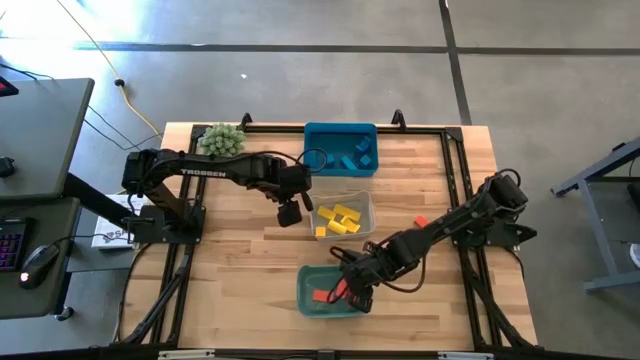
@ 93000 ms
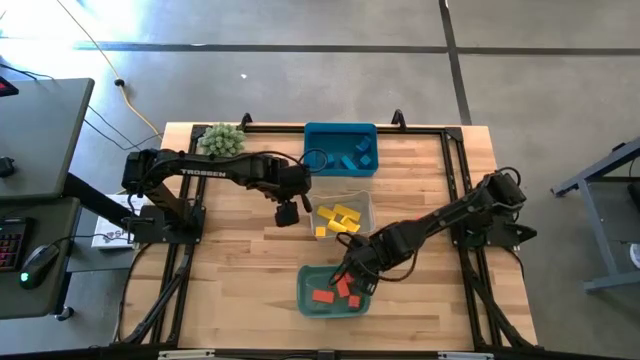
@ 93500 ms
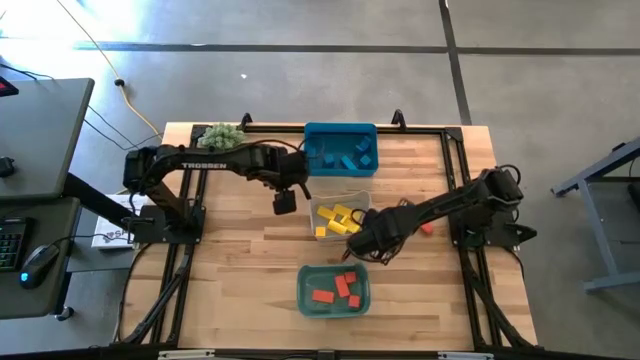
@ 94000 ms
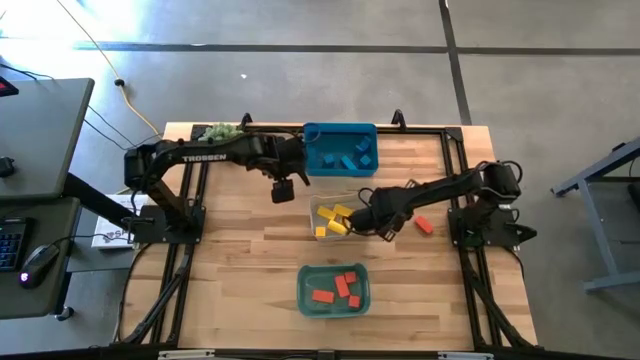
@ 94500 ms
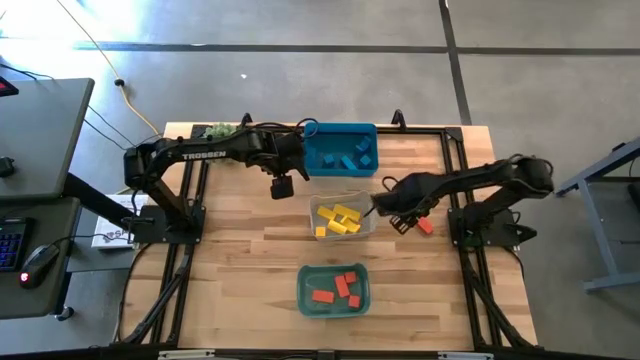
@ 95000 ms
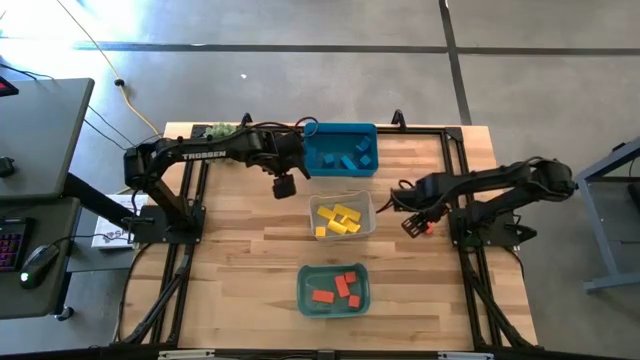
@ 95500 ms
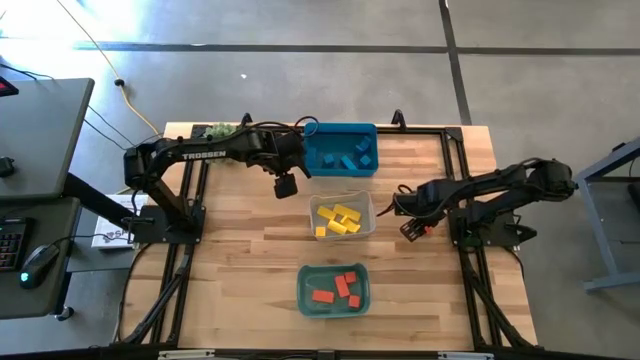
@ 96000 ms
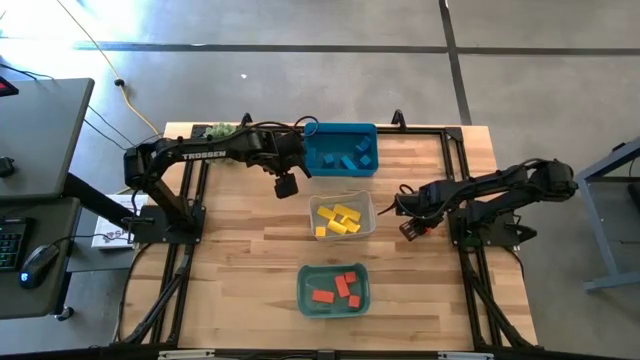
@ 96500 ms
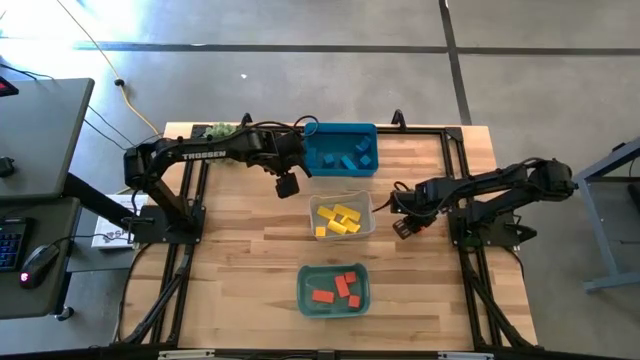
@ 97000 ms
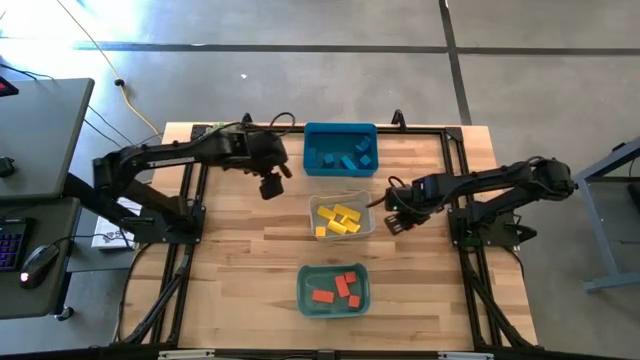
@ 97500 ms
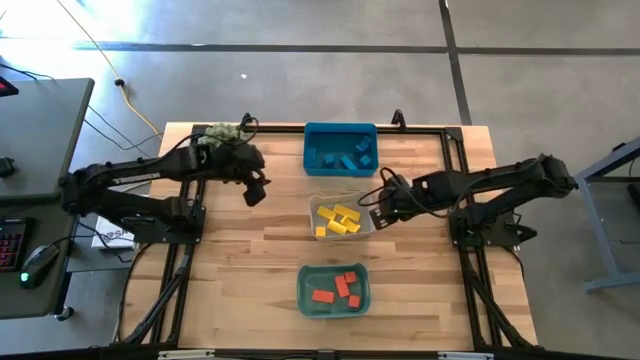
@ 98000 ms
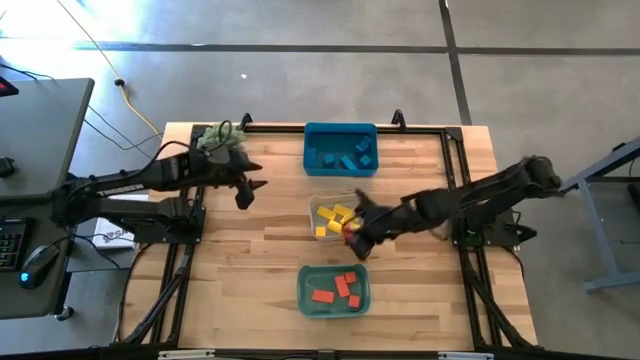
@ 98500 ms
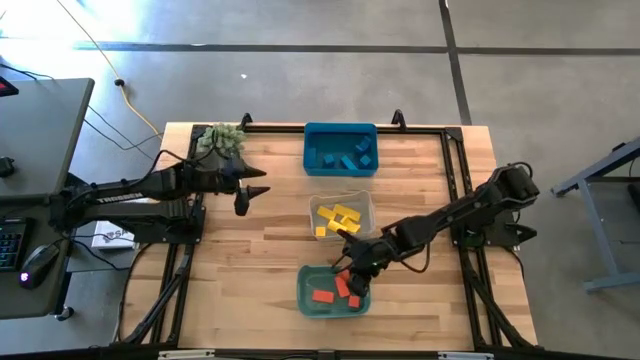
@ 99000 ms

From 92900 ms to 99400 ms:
Task: Sort & place blocks by color
Put the orange block into the green bin

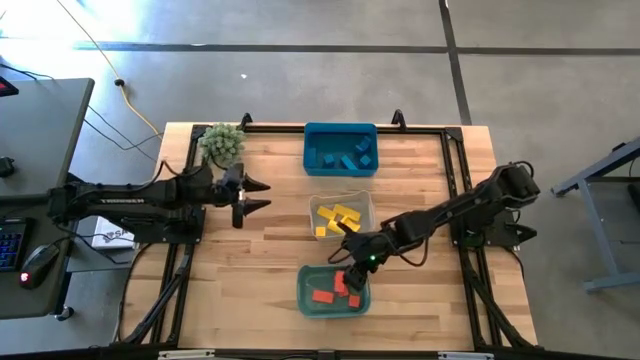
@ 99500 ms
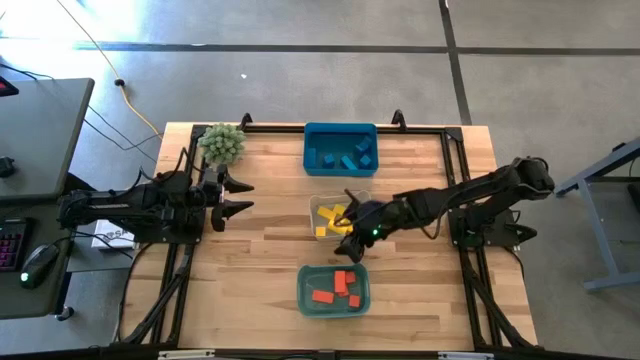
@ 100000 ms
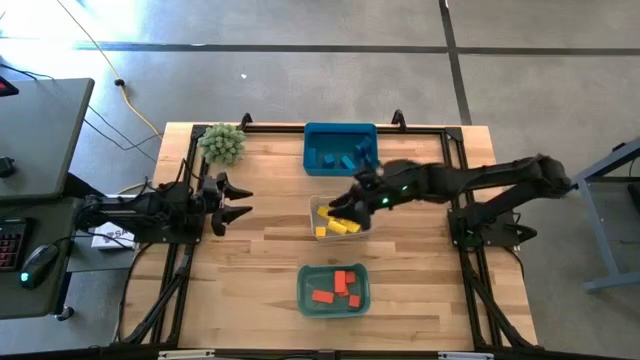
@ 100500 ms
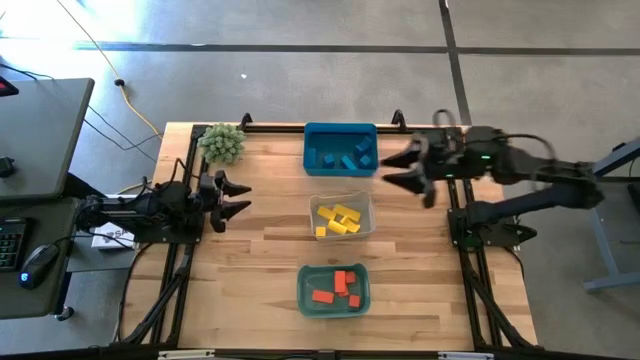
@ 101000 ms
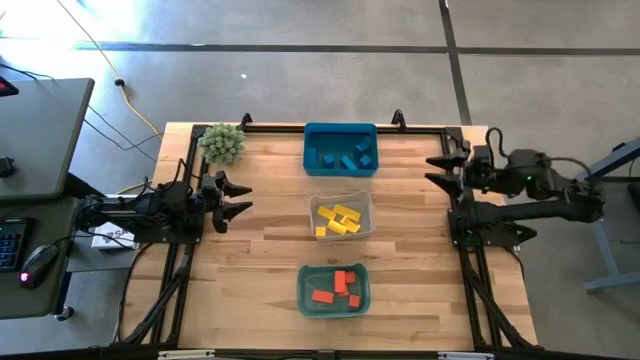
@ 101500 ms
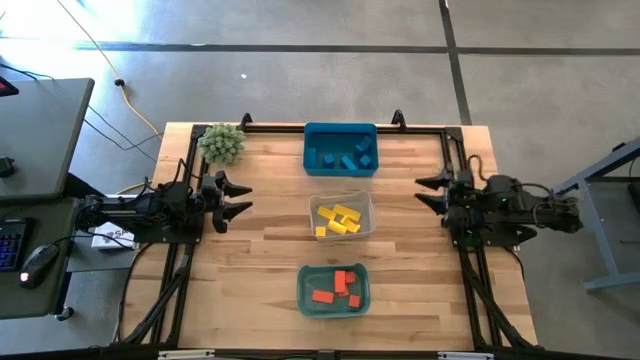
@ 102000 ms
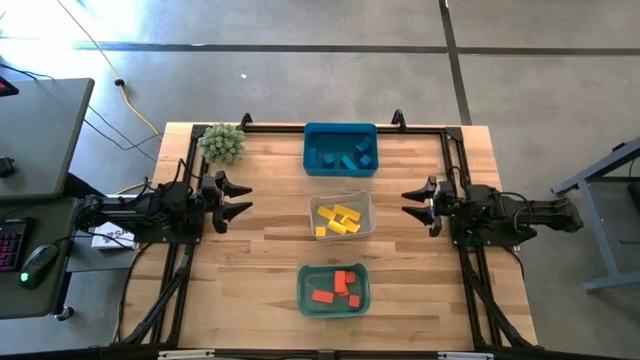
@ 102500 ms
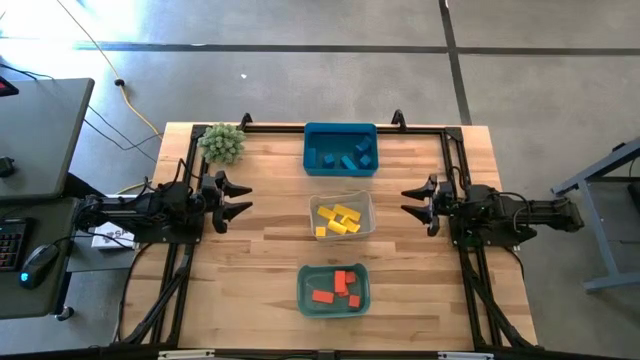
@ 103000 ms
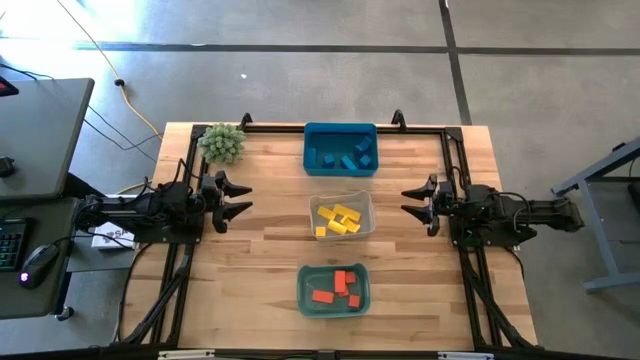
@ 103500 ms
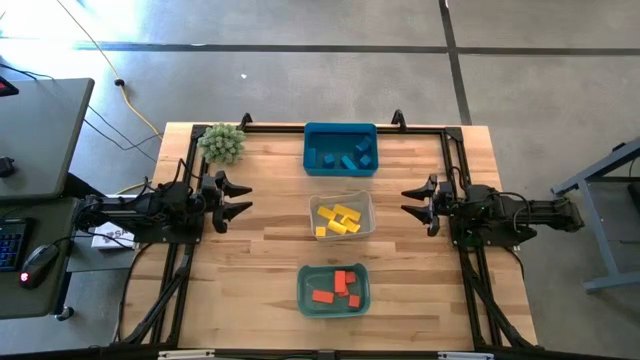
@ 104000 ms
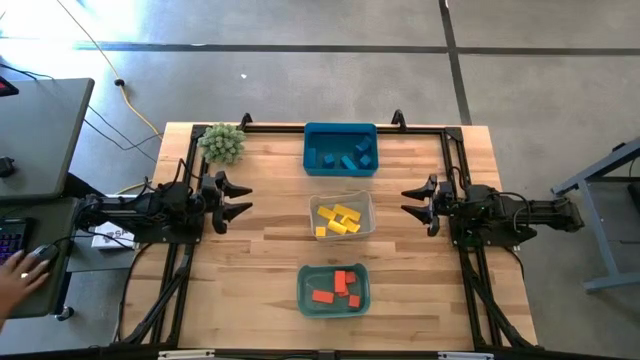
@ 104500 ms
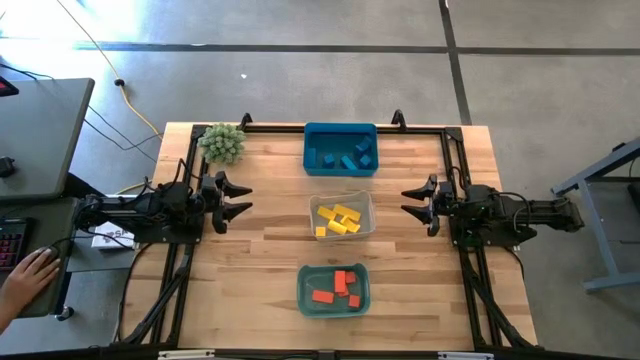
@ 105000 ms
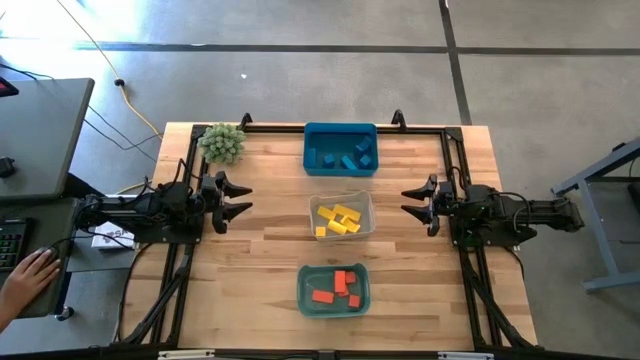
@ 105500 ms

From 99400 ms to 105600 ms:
Return to Home Position

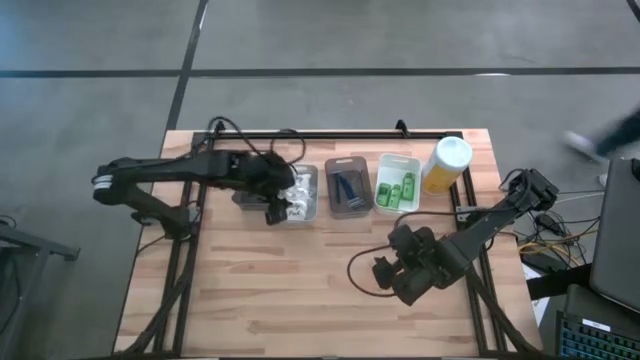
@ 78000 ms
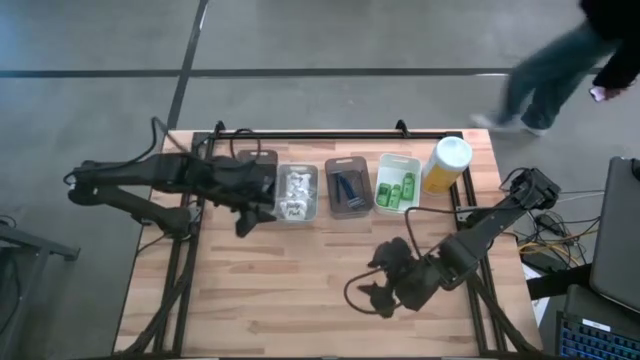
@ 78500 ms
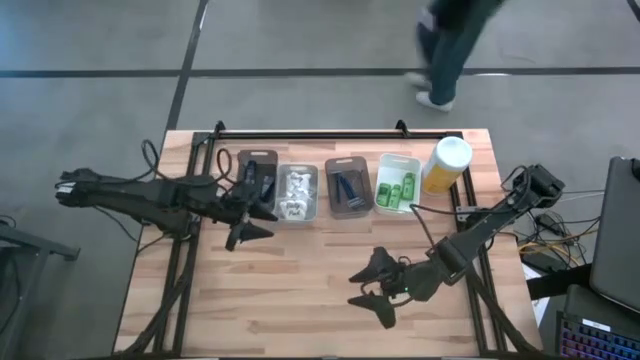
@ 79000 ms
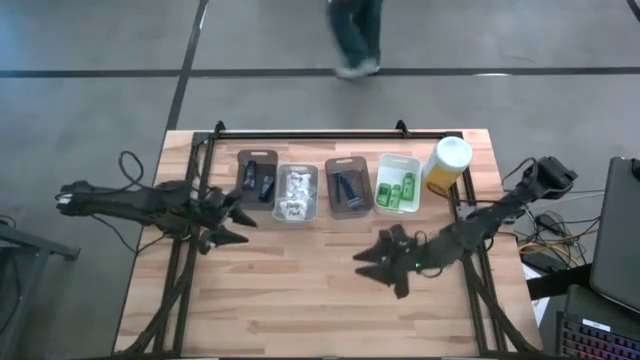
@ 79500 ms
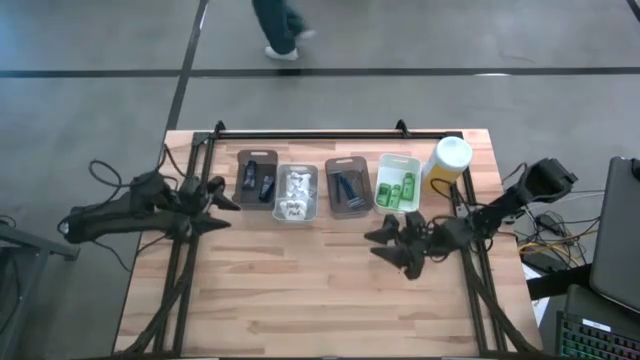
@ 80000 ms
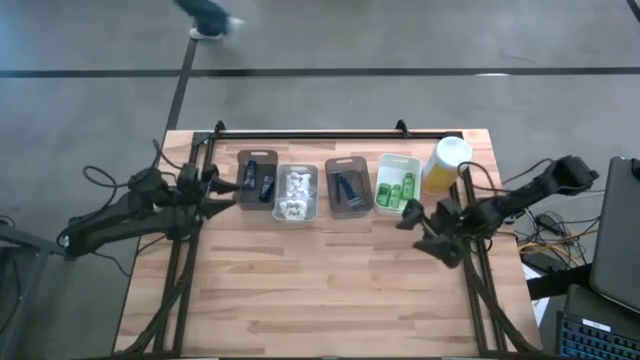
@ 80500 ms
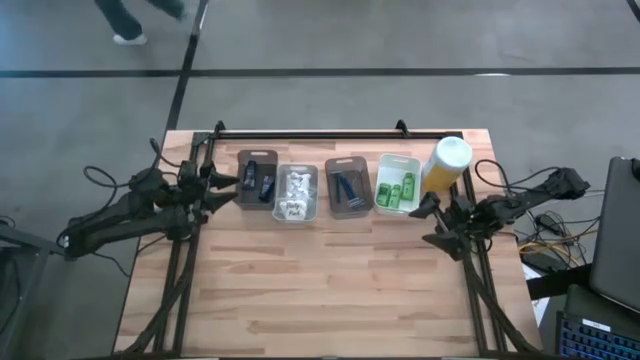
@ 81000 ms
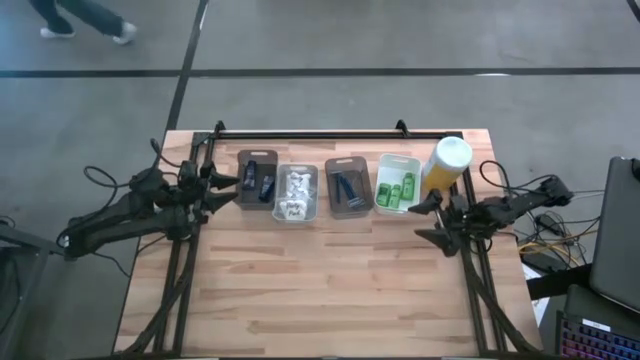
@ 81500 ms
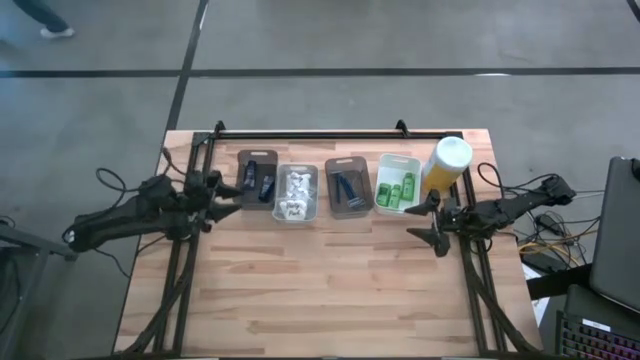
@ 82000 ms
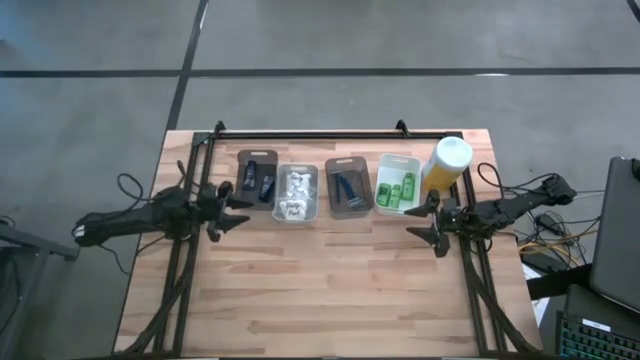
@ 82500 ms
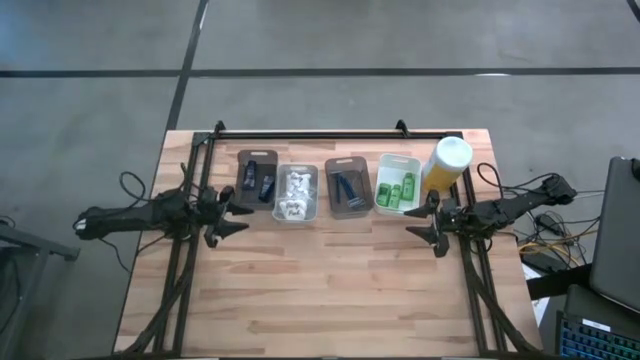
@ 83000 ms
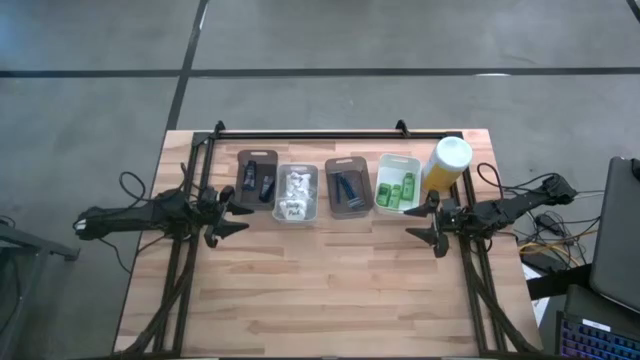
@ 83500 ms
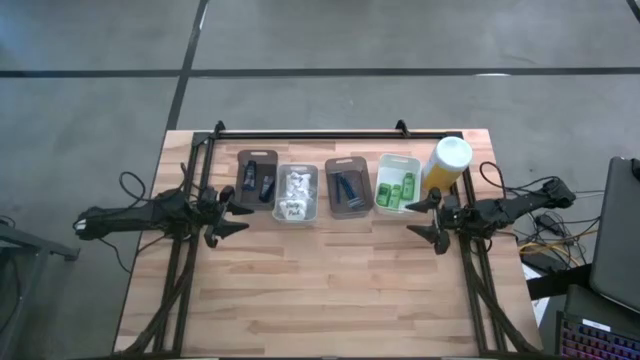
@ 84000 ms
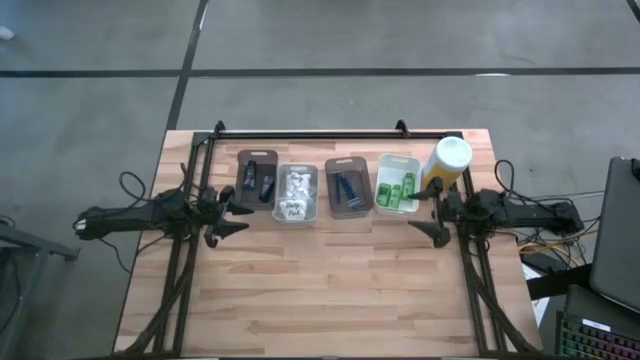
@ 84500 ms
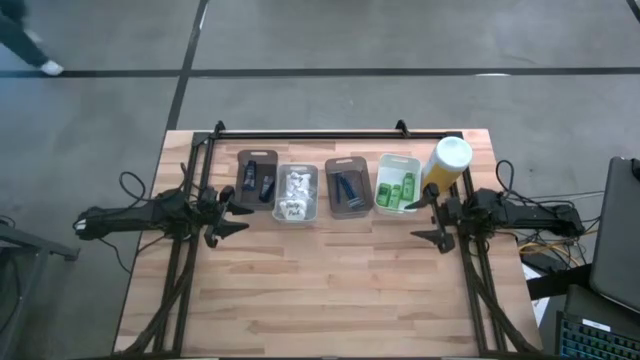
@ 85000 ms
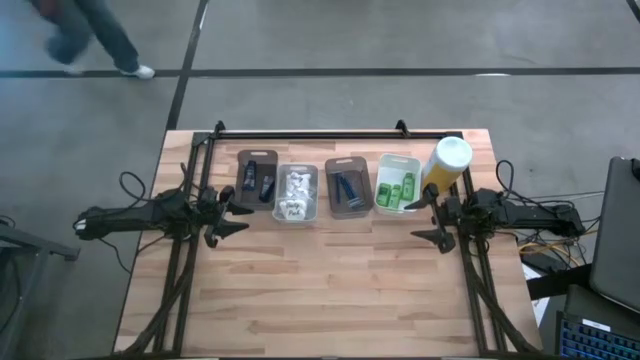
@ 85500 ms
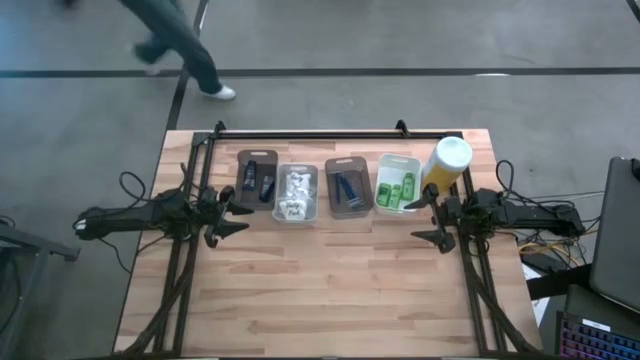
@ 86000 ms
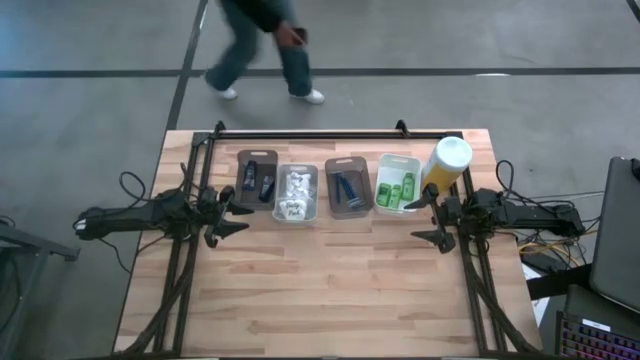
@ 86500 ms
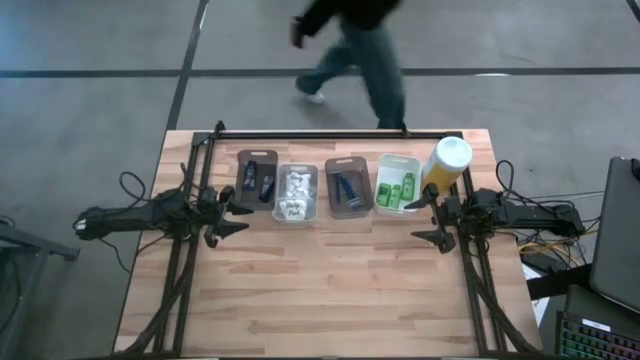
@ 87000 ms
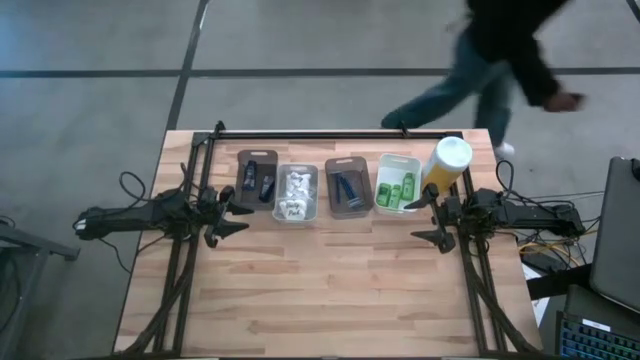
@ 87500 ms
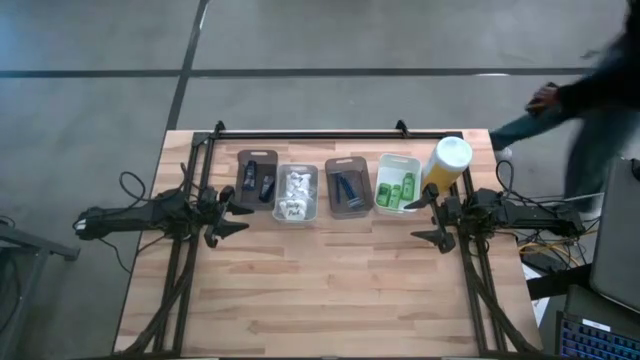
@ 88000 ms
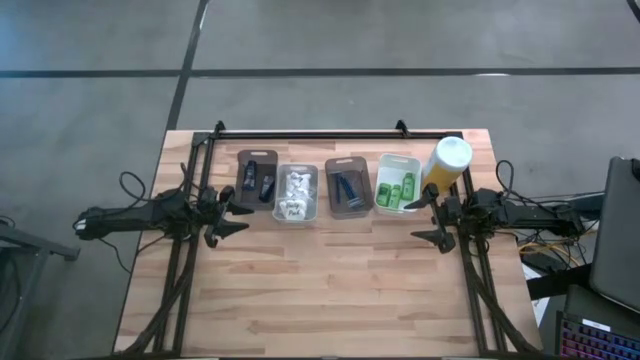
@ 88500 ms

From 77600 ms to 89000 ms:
Task: Pick & Place Travel size toiletries
Return to Home Position
